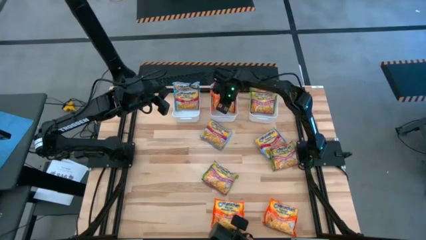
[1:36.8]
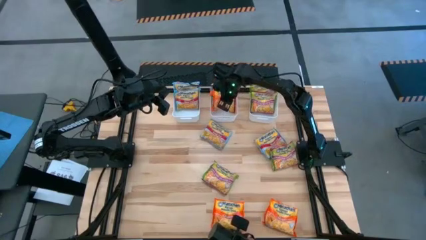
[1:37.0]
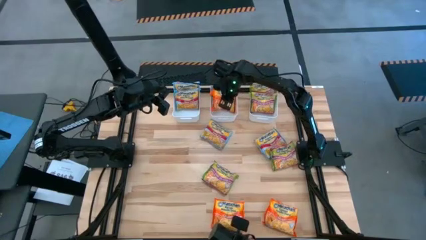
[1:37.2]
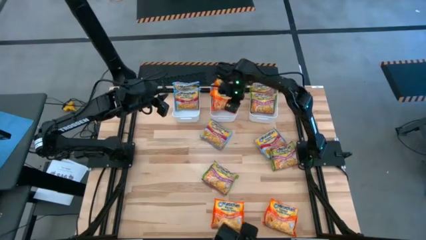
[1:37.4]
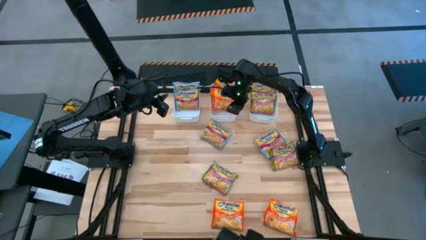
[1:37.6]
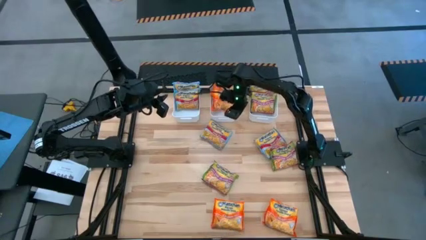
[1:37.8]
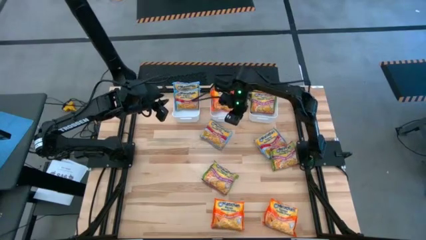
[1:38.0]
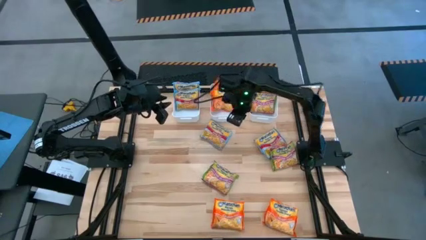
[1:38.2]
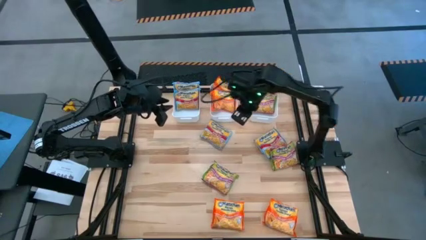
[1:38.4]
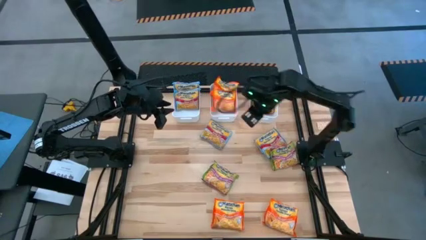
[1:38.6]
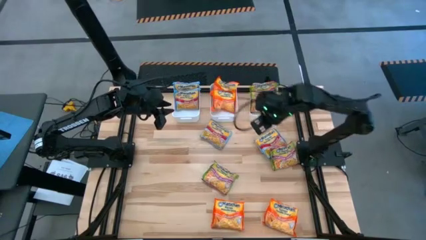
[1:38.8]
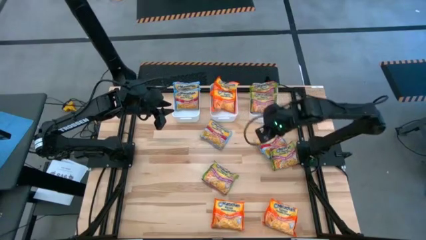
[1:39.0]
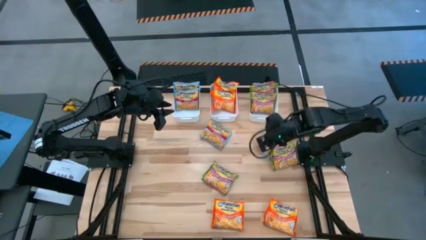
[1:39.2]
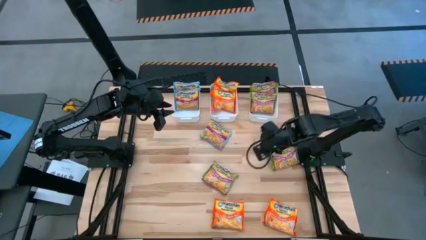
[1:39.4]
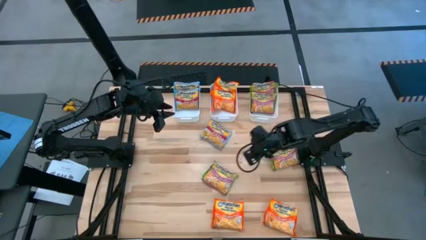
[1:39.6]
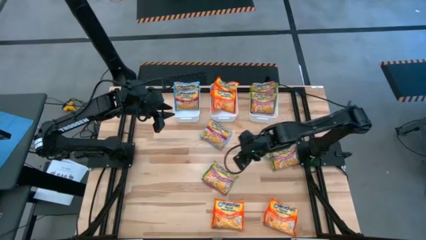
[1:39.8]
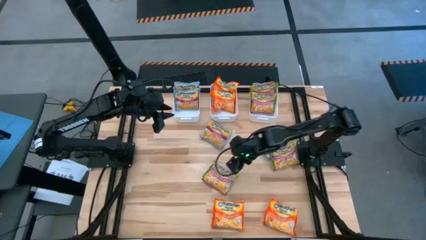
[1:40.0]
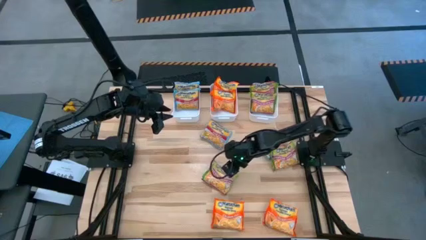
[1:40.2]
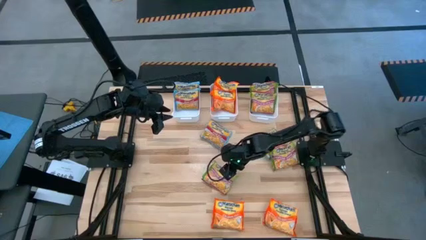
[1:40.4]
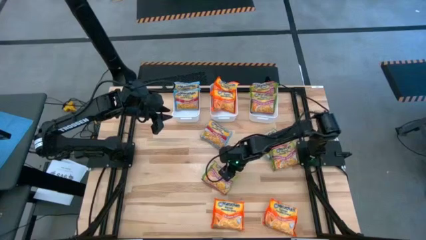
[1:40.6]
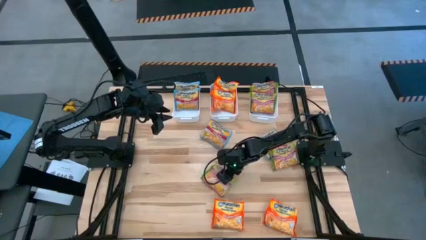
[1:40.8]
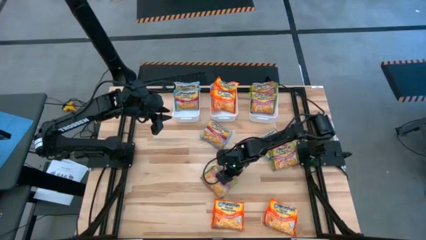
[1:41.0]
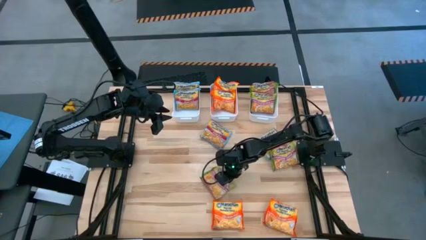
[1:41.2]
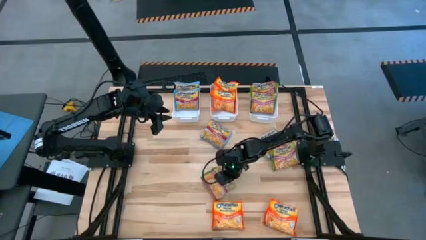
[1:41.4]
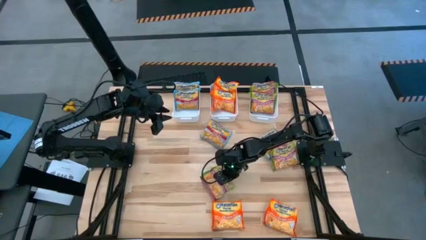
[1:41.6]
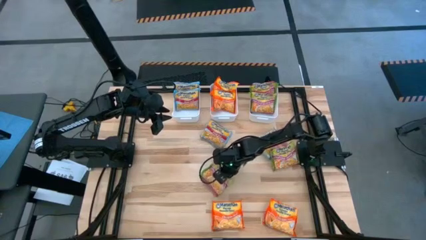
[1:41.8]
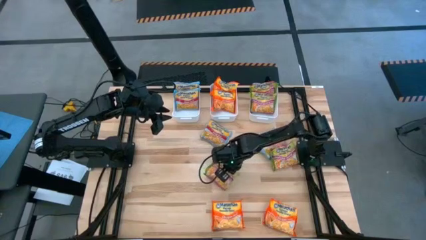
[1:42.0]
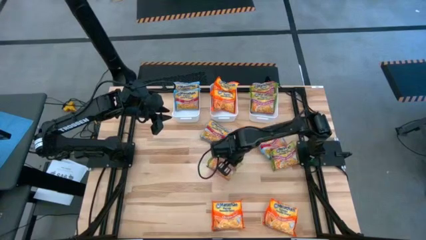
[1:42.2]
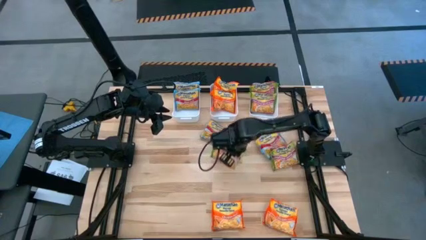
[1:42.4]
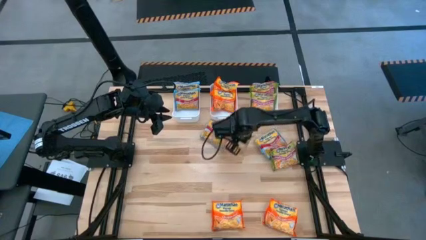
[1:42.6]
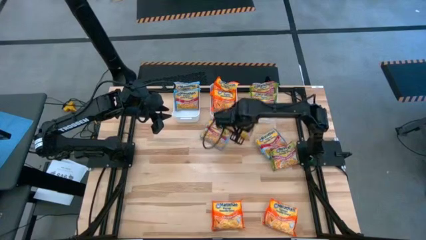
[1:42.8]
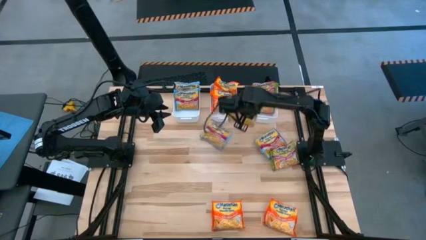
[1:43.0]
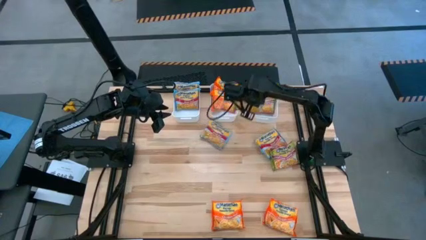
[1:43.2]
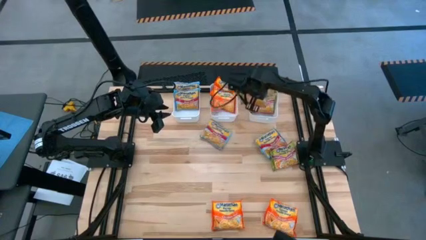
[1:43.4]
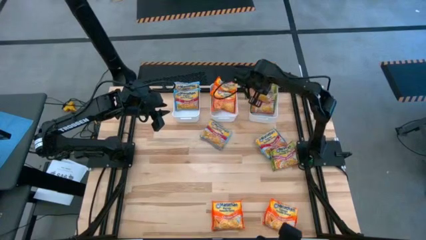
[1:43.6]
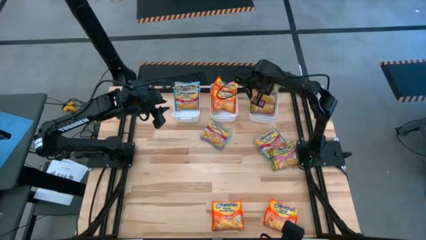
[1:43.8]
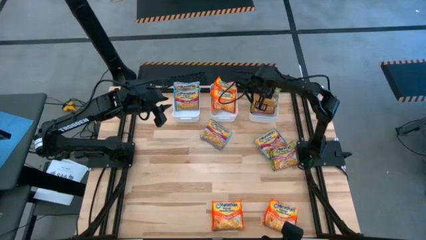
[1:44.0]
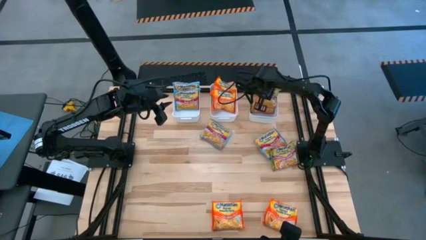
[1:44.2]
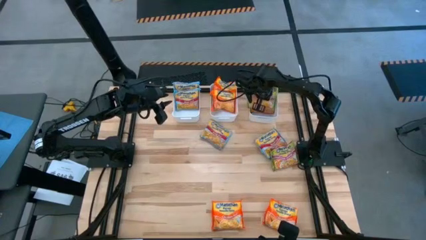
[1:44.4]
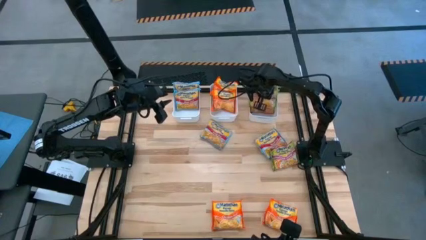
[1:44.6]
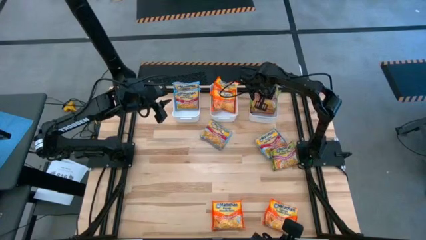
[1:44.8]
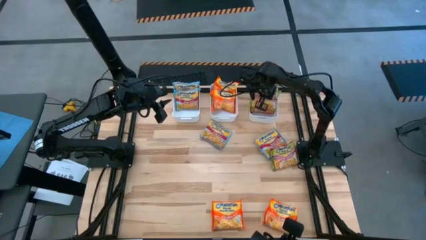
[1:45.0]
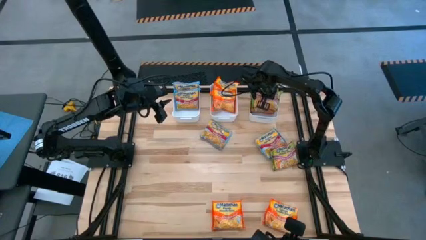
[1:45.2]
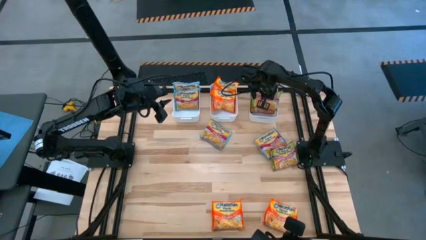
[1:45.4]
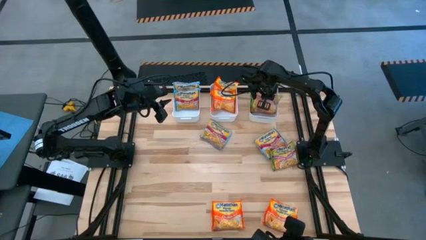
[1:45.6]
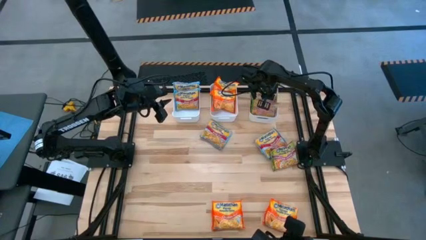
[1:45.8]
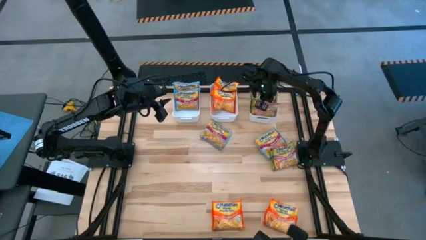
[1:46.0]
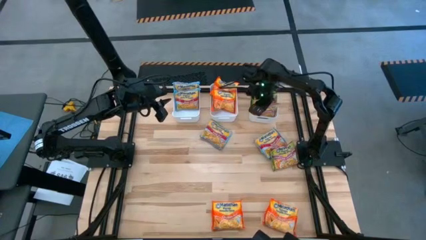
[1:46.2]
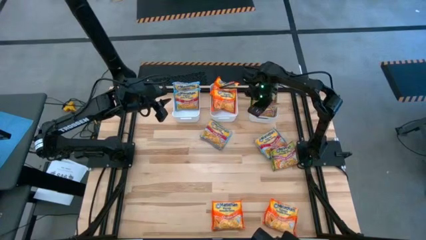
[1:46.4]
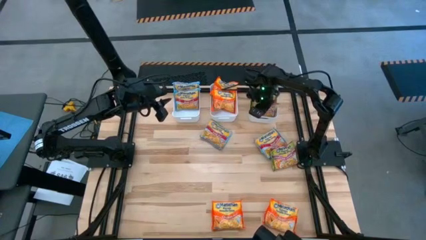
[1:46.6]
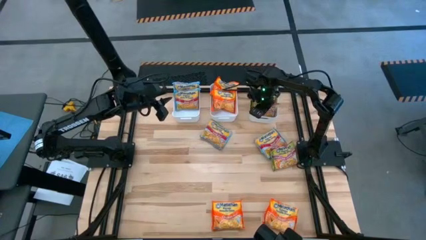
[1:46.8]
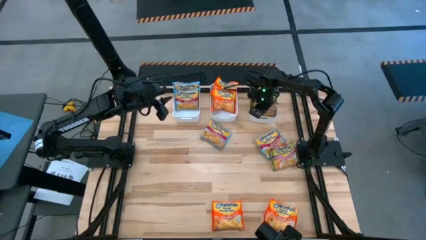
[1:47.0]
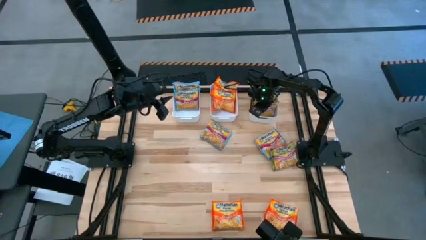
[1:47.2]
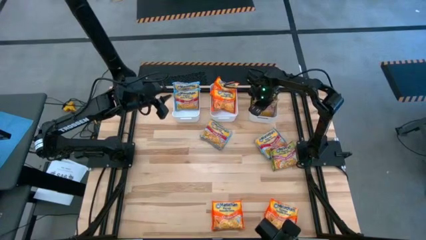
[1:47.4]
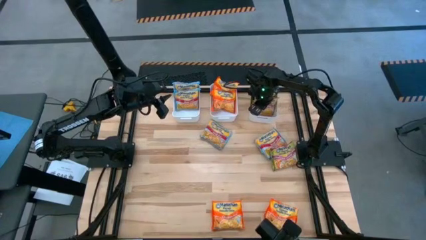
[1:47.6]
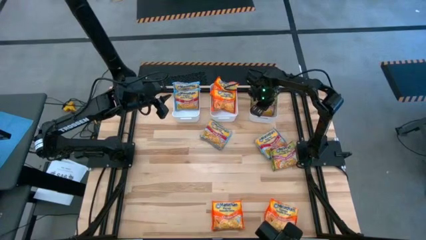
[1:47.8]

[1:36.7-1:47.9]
Task: Sort Maruchan noodles
Put the green noodle pack into the right white bin

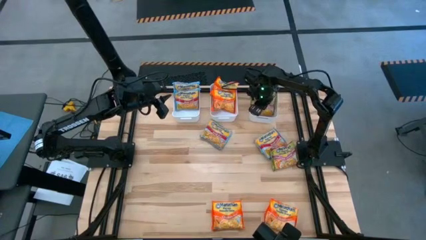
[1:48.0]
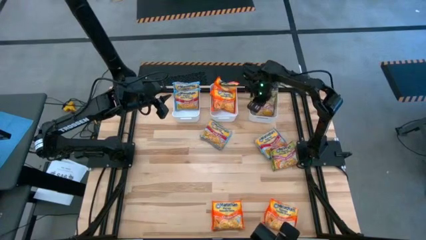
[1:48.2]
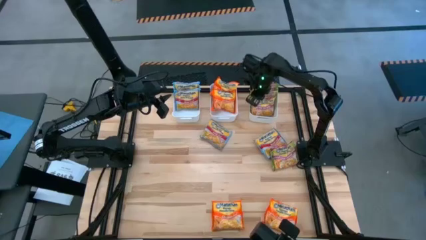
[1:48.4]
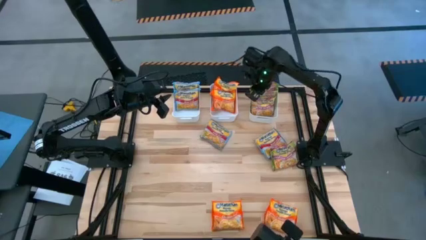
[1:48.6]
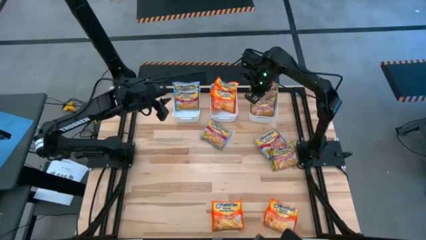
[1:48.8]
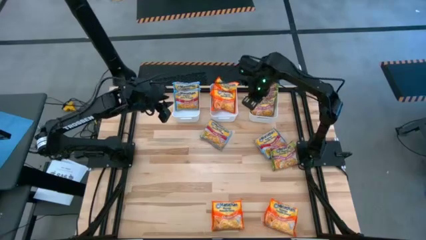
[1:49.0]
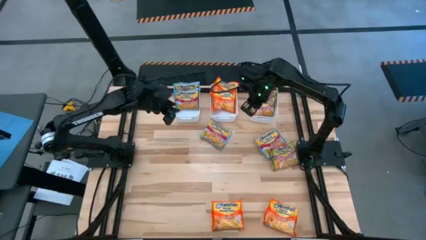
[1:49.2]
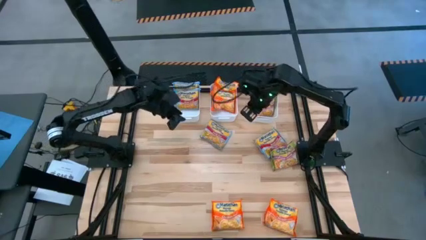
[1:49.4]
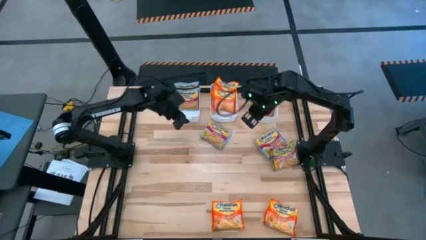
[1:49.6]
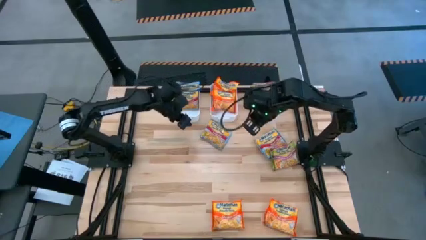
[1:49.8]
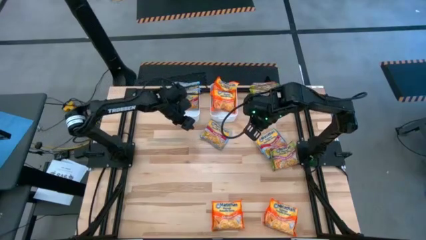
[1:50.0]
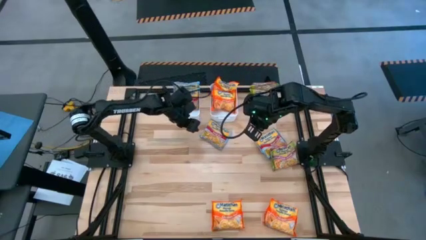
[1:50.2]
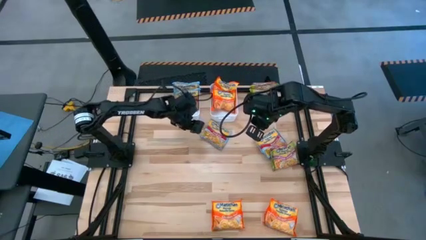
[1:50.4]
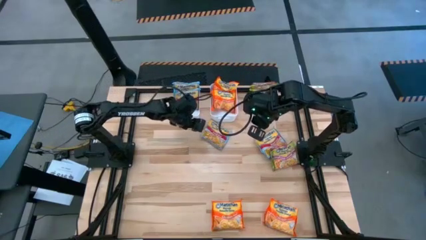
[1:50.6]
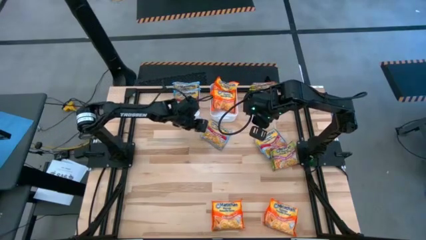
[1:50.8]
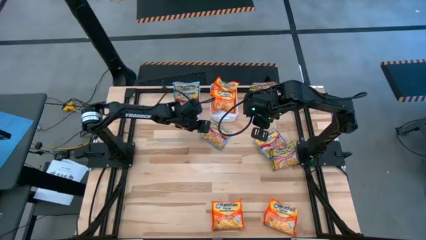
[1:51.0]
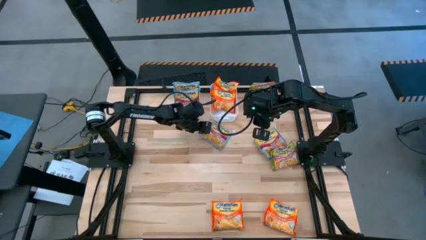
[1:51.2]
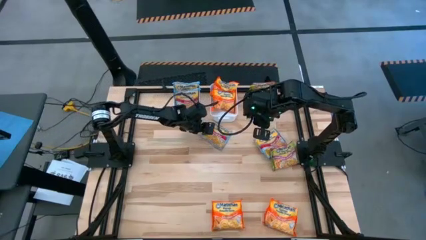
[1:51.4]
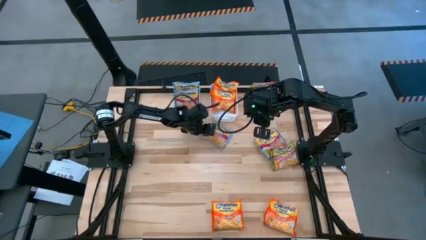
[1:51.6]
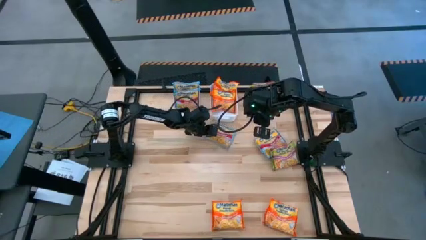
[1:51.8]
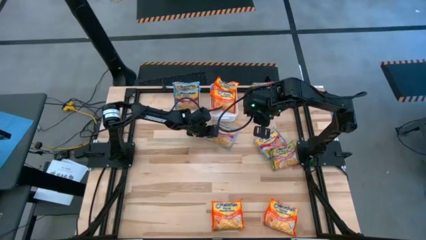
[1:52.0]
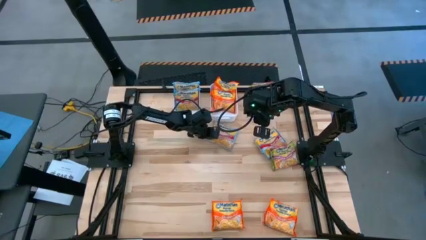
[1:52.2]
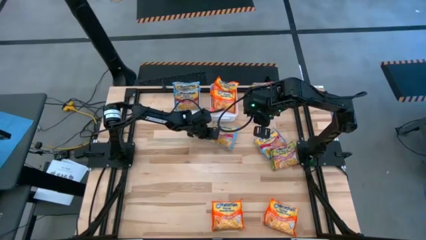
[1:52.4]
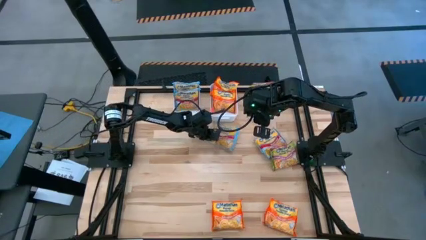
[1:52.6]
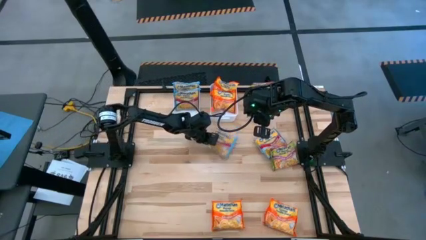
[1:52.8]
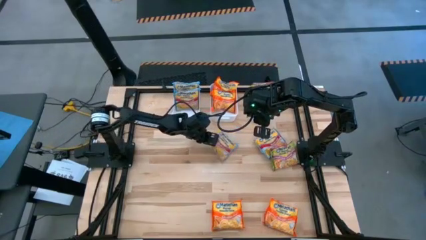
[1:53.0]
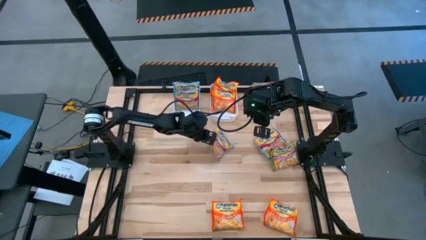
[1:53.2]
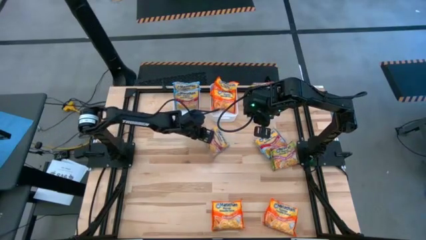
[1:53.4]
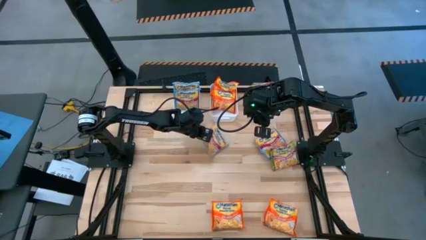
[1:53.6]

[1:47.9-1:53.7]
Put the blue noodle pack into the left white bin
